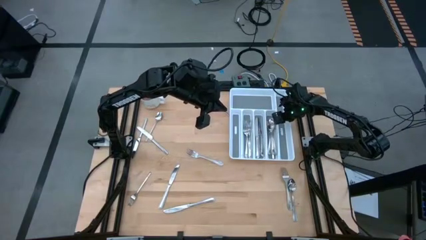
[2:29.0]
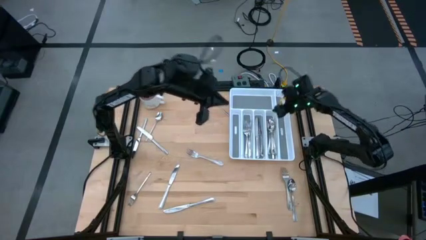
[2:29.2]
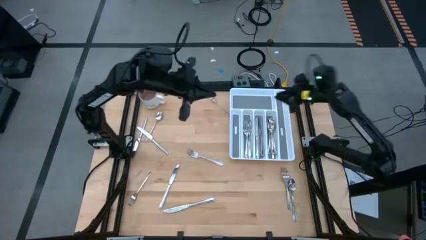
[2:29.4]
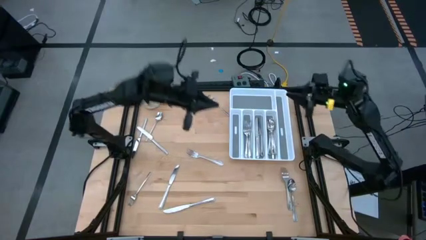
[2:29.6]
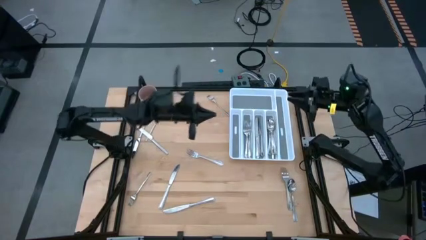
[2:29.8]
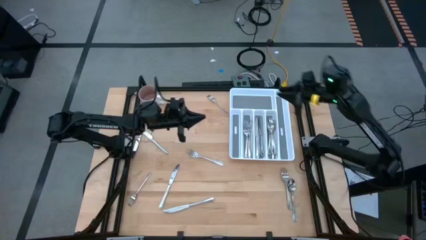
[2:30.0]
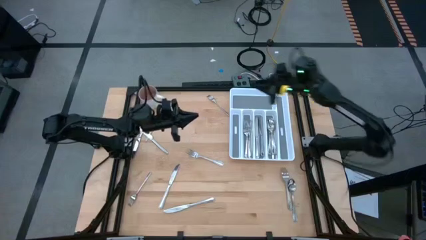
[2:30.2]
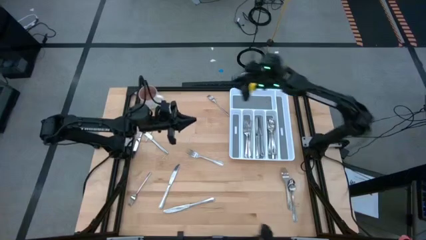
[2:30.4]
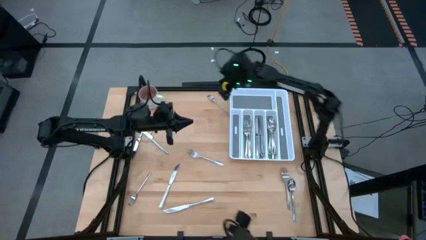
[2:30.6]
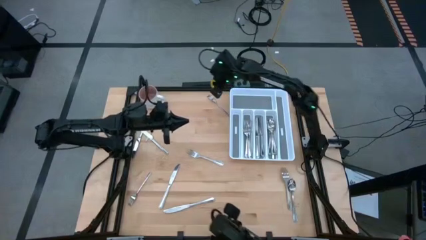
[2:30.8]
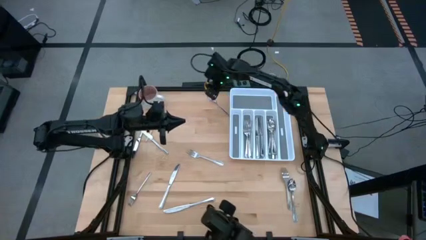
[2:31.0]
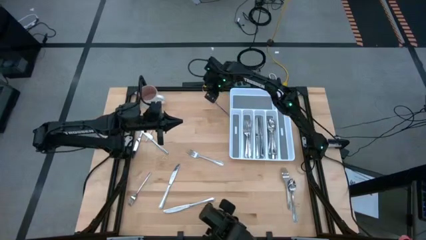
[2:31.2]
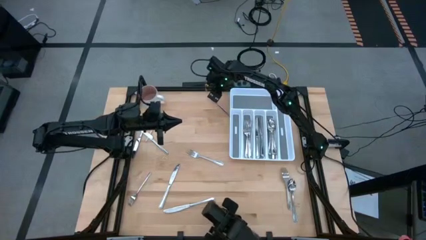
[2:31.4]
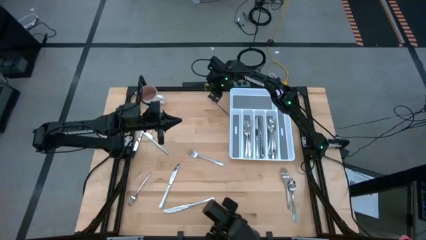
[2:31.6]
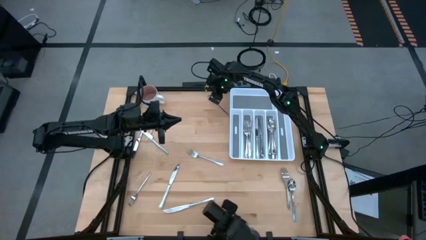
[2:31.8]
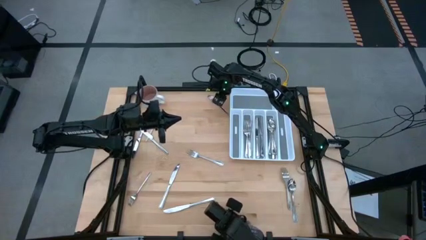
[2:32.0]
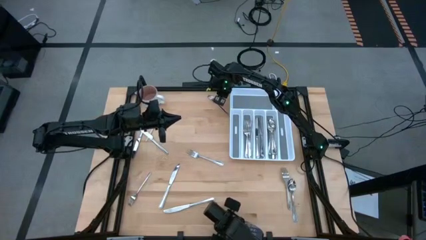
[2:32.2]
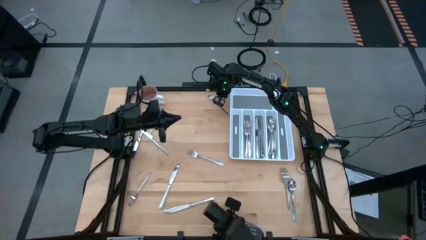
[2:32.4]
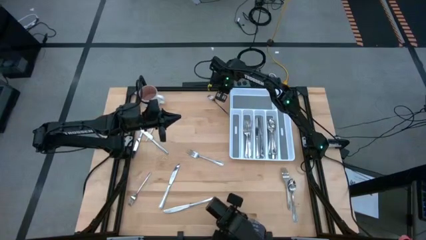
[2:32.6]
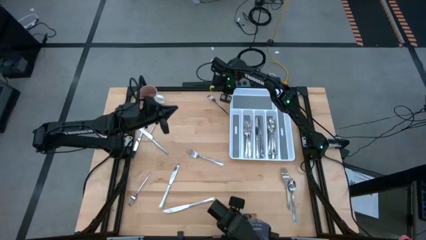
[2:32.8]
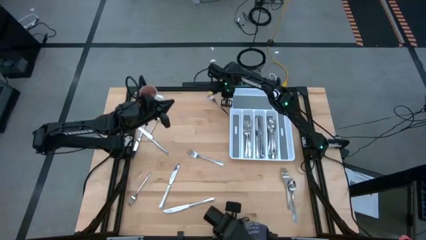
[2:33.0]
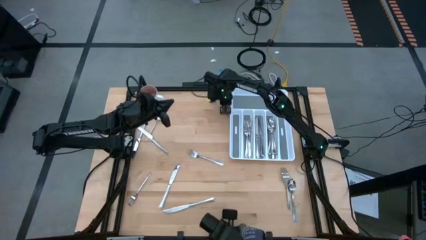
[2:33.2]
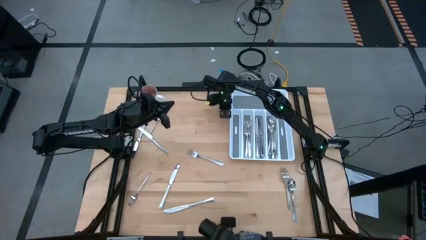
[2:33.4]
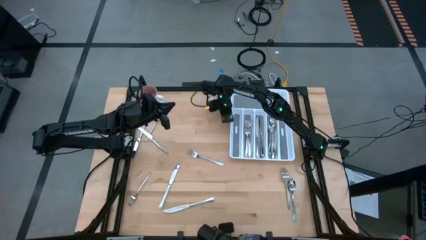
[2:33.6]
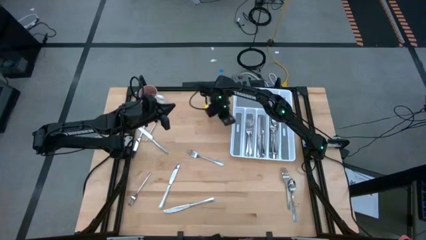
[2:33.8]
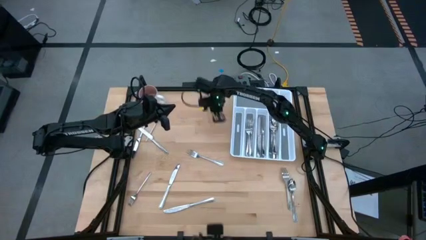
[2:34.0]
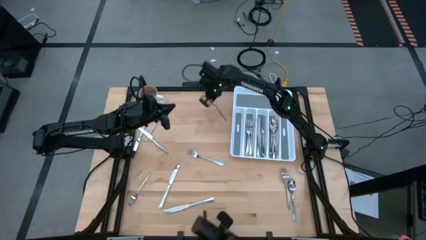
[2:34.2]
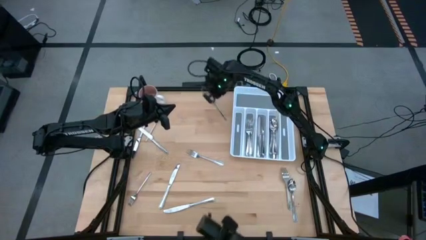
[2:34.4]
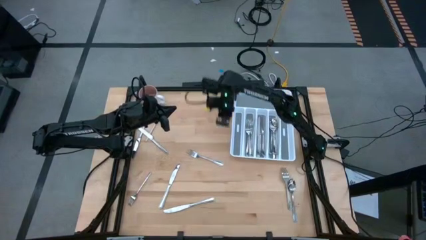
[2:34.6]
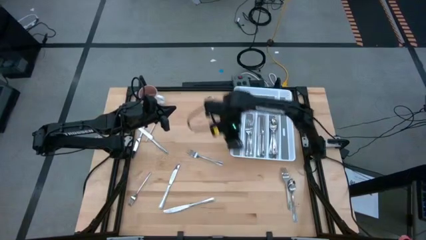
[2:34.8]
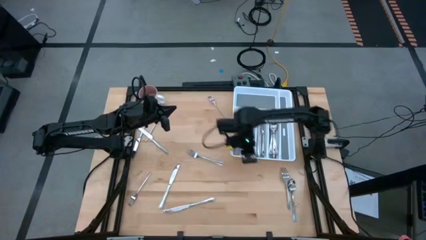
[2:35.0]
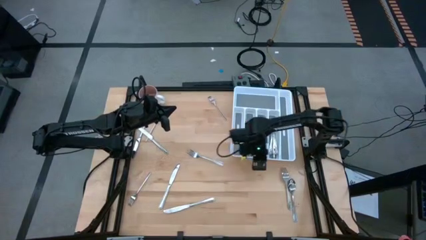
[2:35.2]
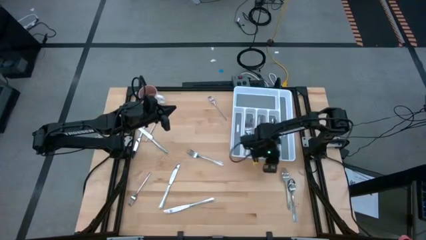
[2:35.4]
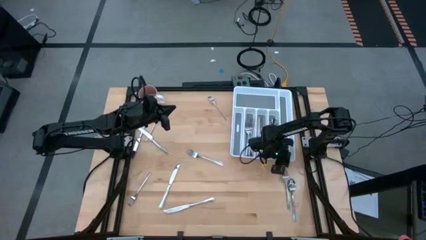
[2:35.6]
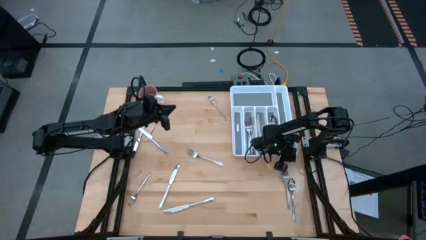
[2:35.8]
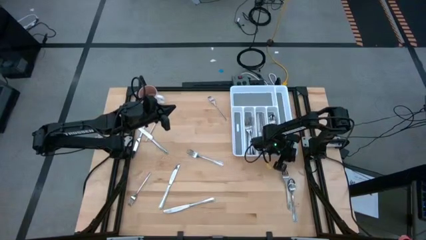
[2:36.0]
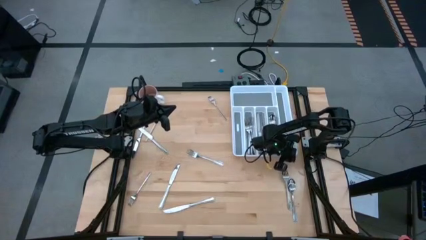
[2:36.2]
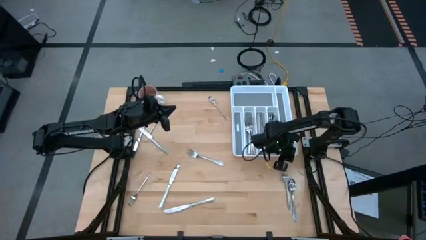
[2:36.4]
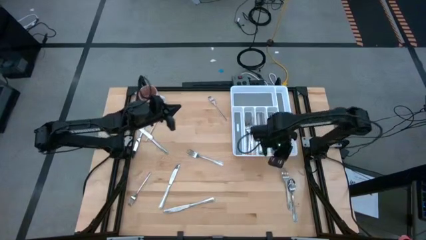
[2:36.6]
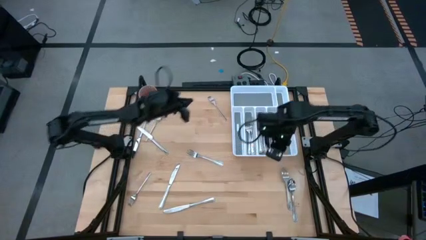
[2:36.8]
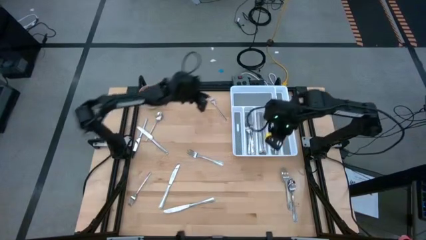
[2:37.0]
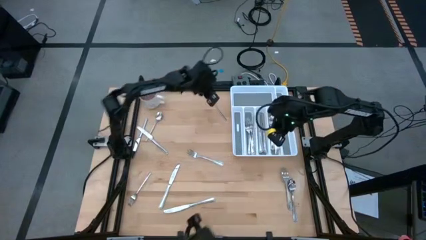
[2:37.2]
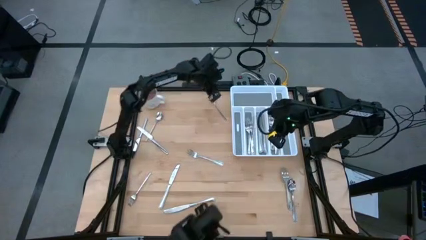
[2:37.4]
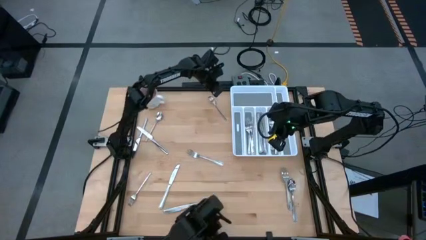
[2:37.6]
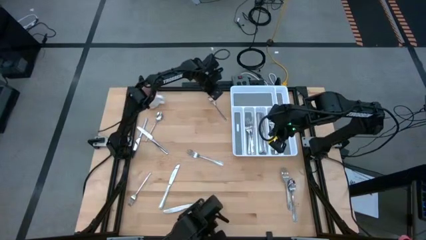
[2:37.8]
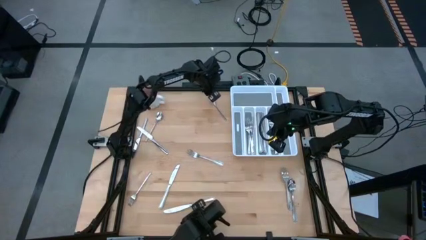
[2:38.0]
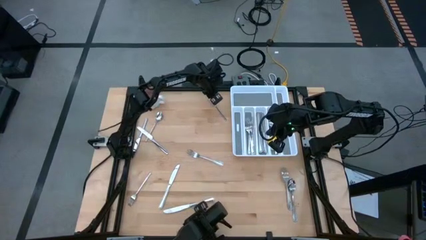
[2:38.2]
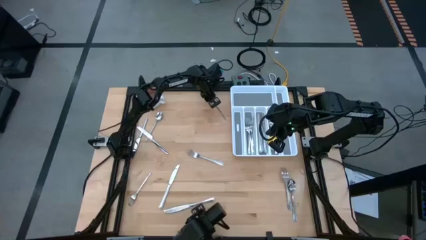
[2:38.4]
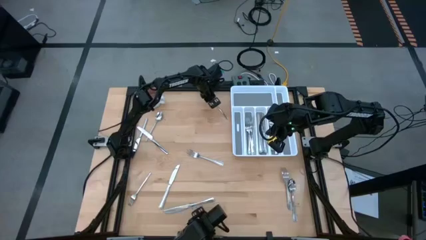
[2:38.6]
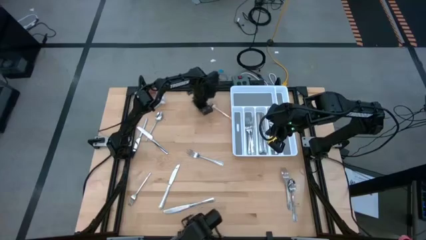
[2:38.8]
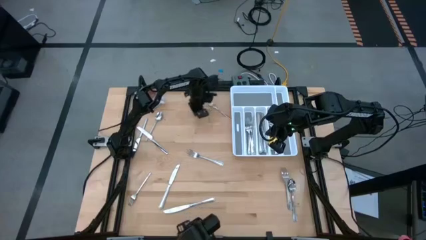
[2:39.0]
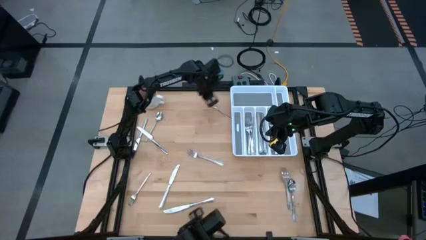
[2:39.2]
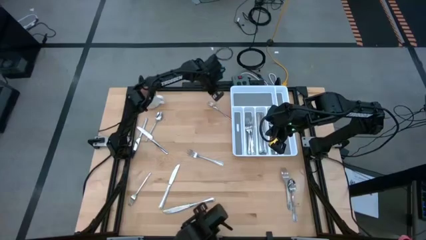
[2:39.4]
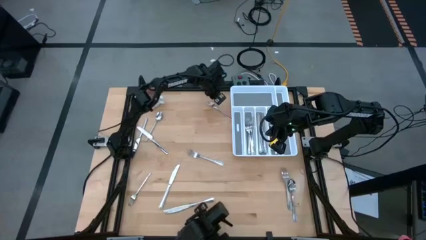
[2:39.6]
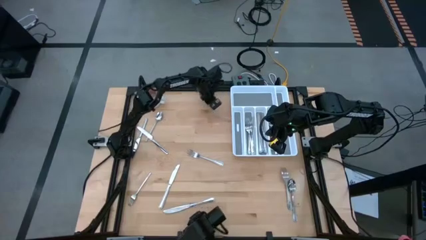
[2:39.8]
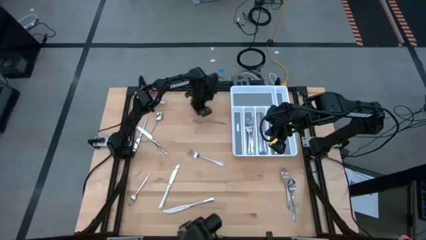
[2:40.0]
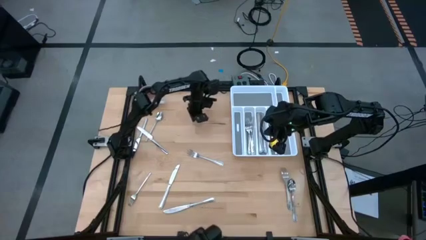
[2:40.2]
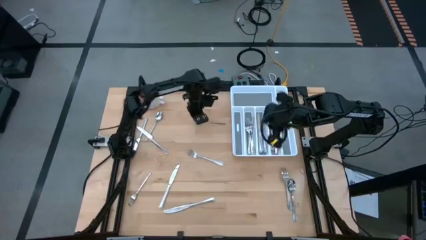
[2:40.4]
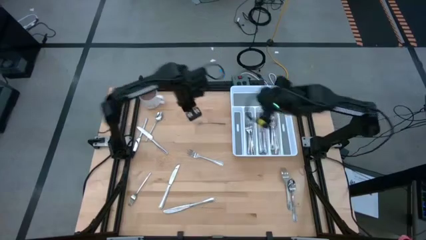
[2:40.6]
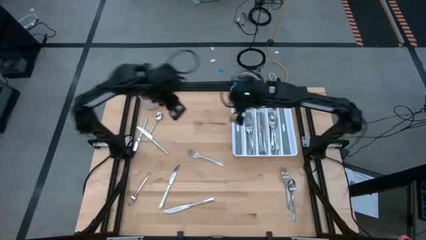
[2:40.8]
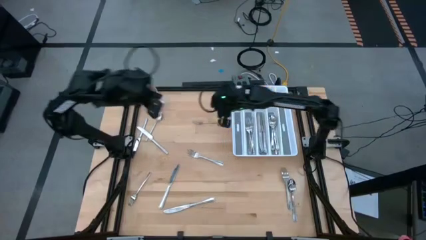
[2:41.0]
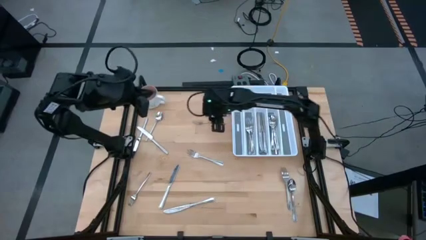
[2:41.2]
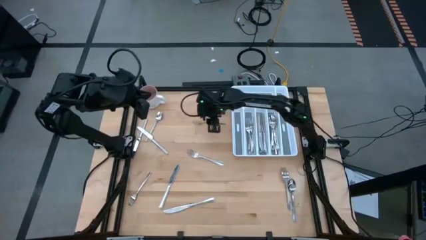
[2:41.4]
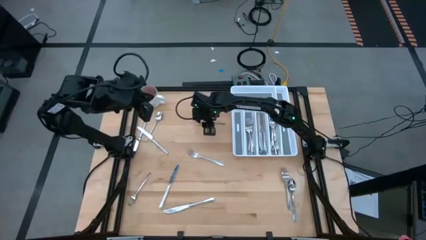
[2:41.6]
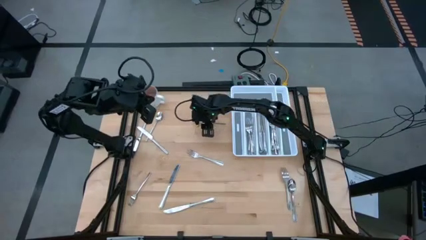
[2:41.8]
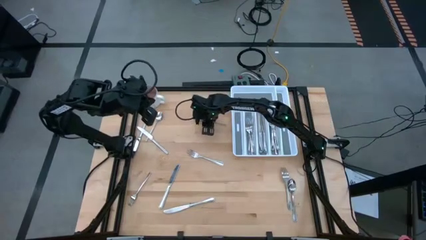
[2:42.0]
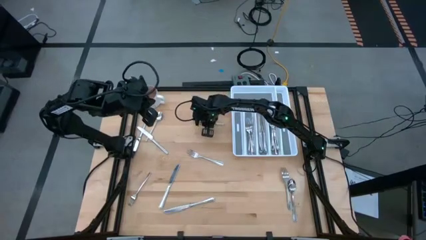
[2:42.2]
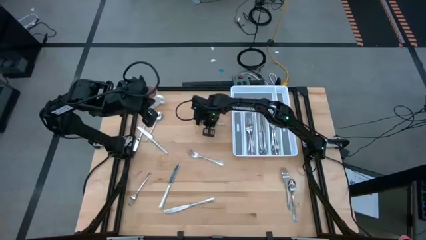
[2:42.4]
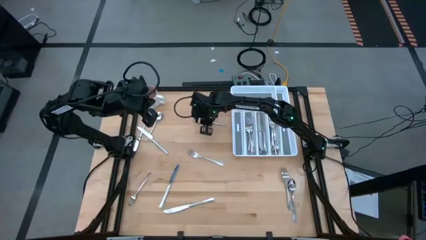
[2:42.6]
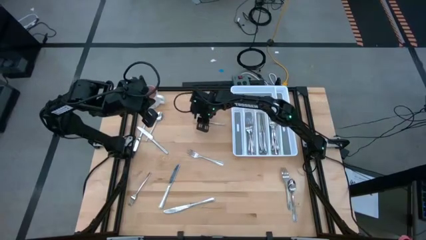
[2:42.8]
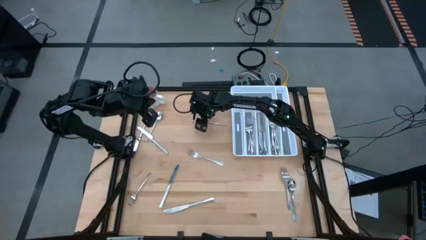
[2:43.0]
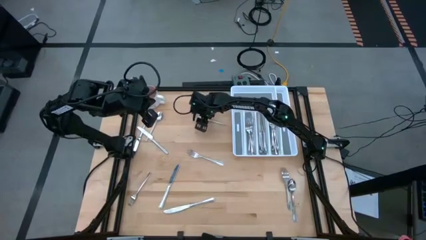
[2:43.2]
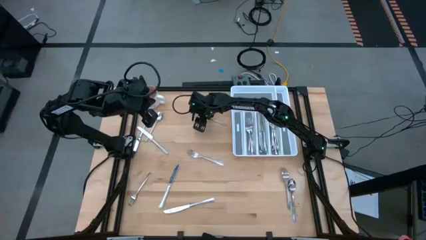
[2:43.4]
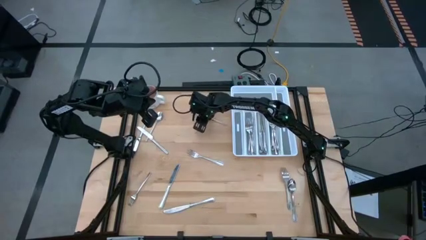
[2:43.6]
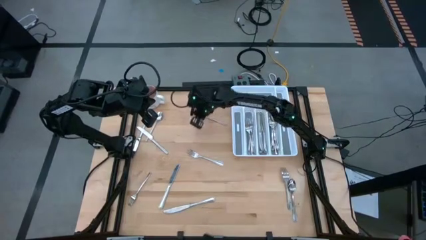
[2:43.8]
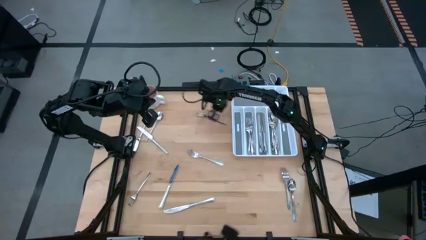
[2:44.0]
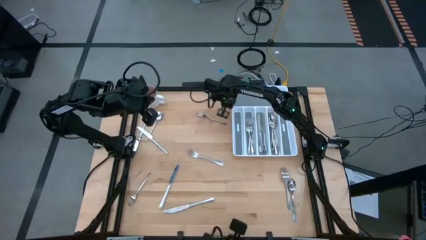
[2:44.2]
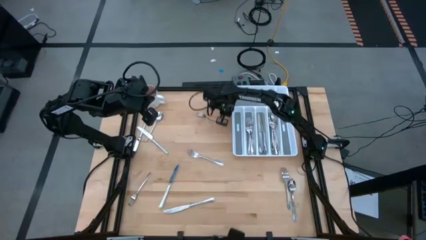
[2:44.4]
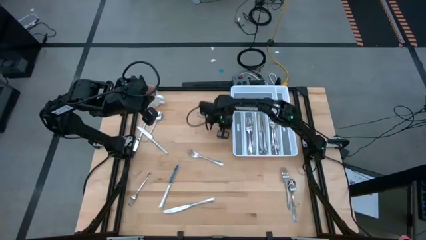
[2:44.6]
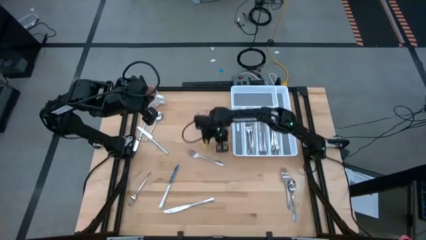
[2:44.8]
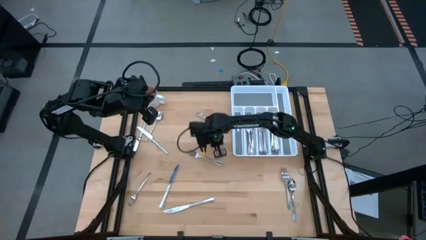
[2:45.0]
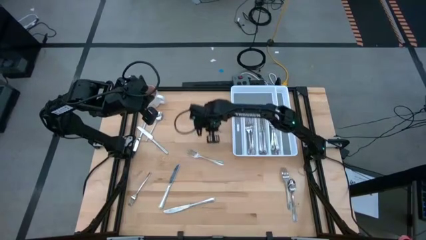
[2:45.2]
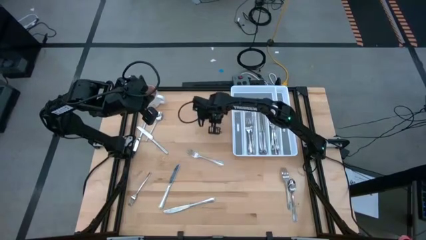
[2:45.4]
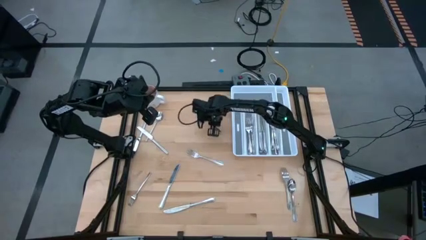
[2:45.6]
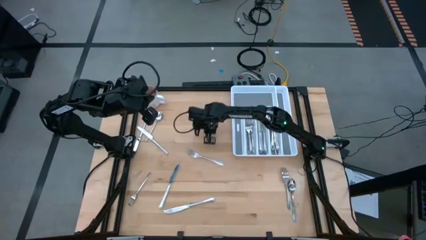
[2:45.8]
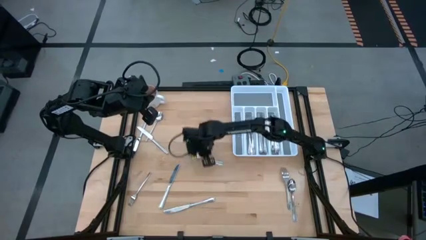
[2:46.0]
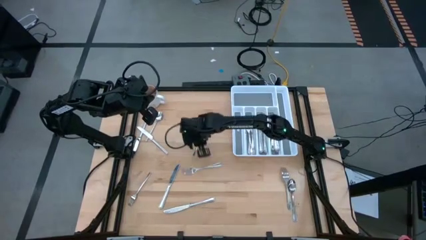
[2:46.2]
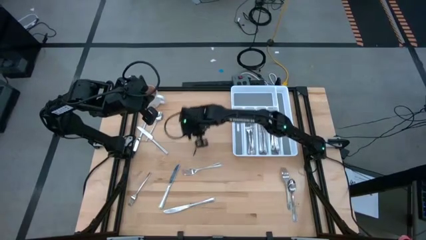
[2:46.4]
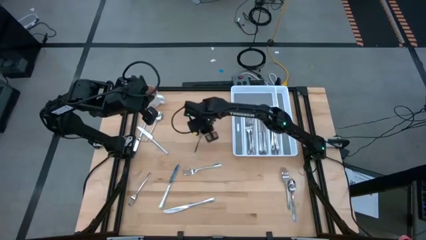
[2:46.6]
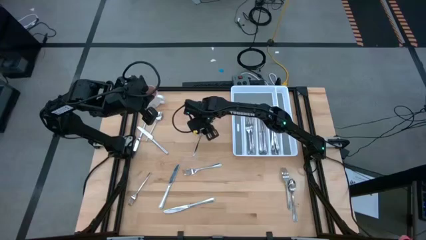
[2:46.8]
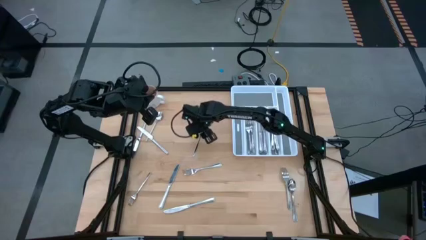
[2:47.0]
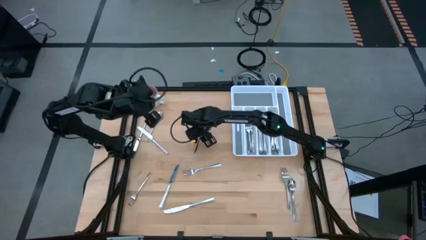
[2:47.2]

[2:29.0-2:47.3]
Task: Sort silverware
Put the silver fork into the silverware tray
